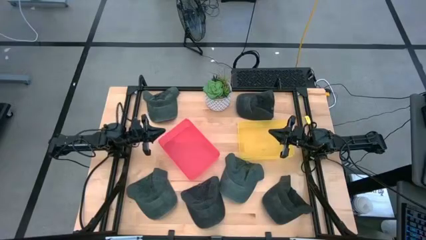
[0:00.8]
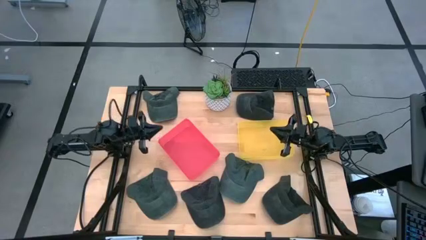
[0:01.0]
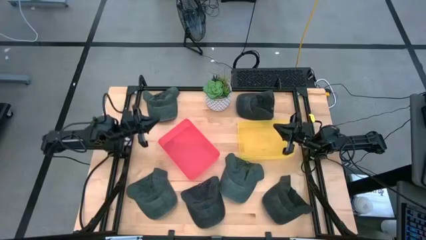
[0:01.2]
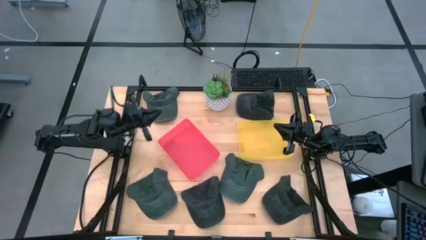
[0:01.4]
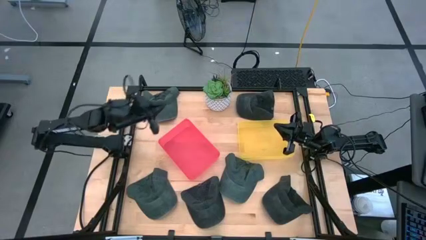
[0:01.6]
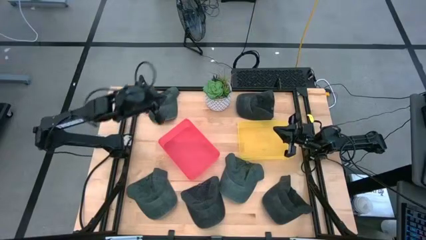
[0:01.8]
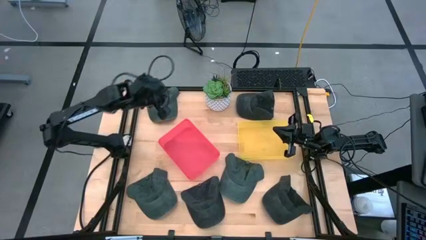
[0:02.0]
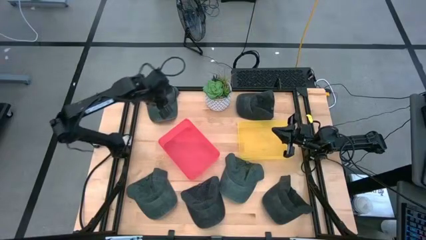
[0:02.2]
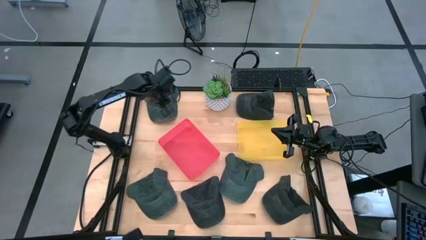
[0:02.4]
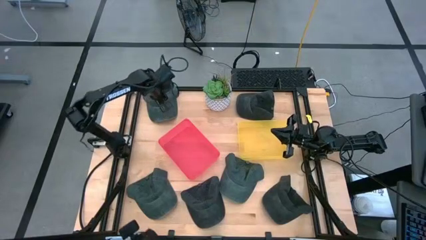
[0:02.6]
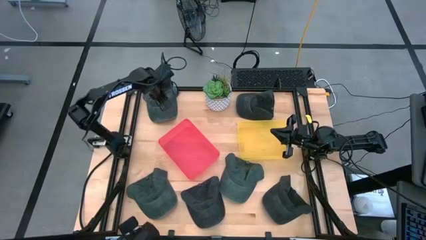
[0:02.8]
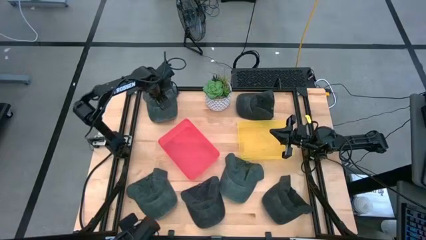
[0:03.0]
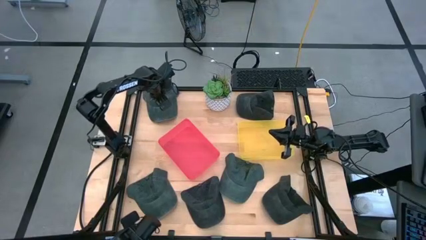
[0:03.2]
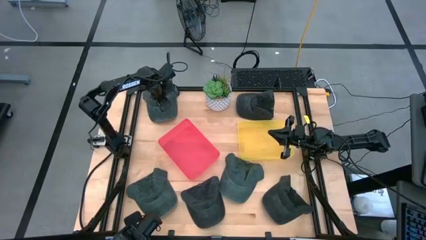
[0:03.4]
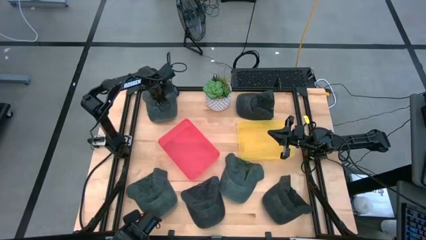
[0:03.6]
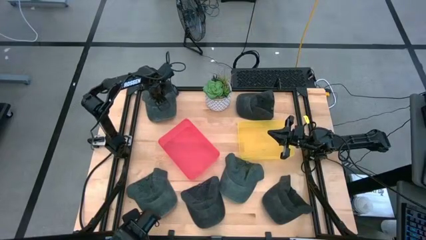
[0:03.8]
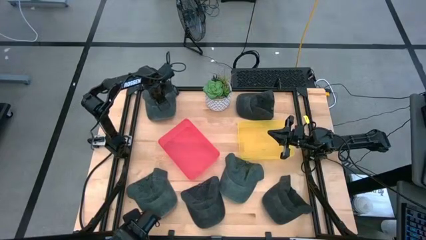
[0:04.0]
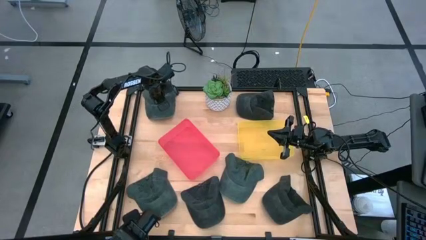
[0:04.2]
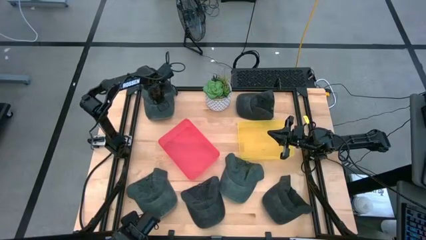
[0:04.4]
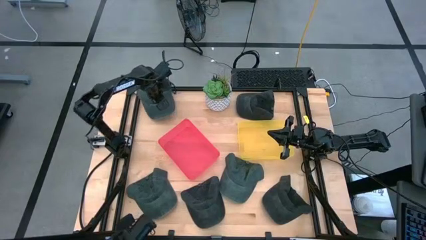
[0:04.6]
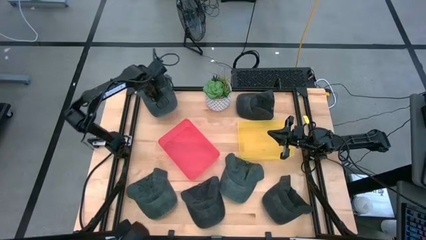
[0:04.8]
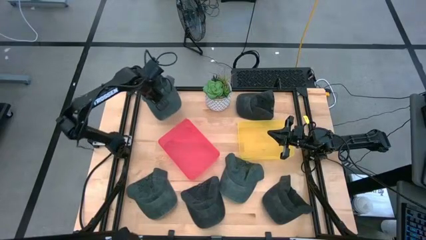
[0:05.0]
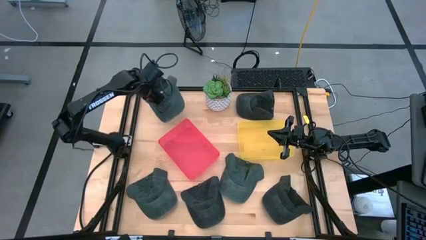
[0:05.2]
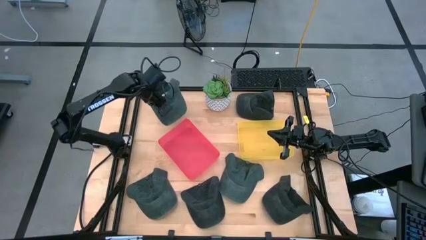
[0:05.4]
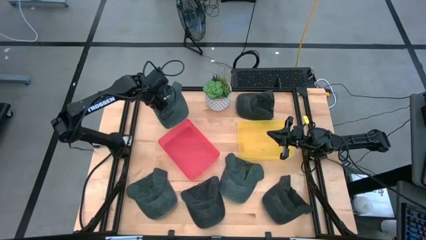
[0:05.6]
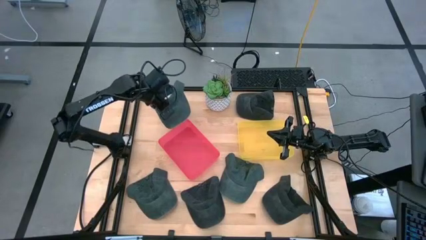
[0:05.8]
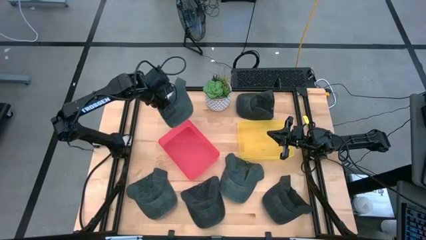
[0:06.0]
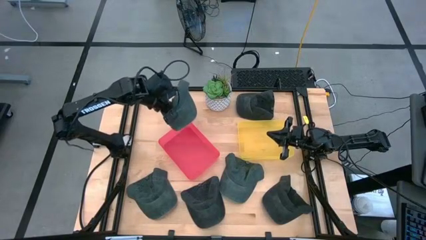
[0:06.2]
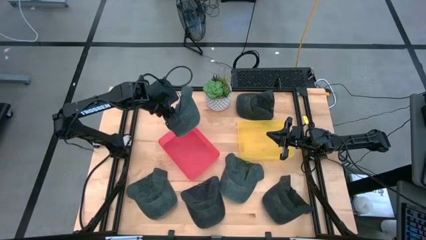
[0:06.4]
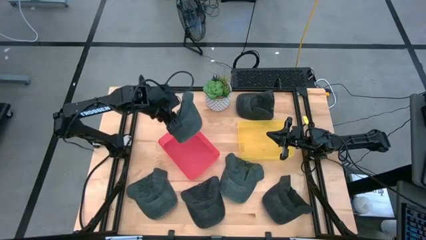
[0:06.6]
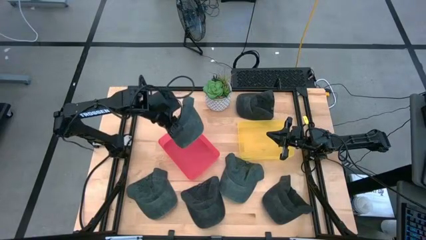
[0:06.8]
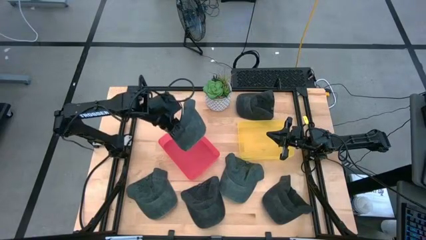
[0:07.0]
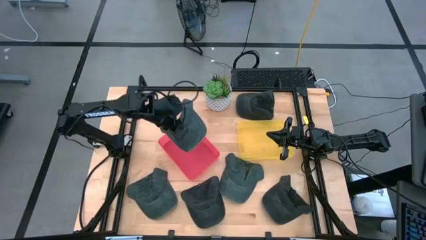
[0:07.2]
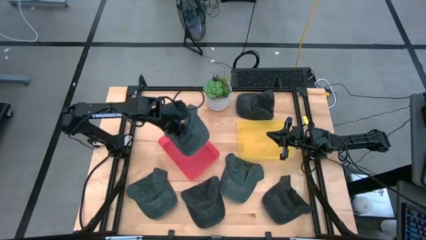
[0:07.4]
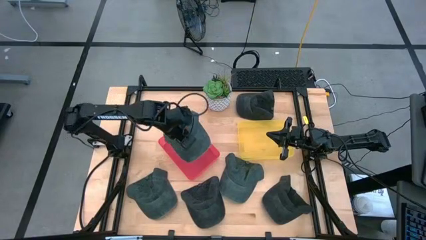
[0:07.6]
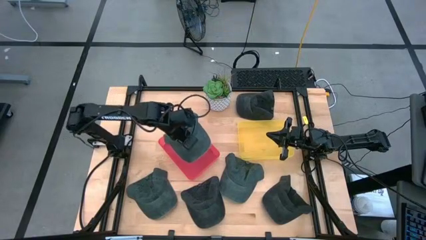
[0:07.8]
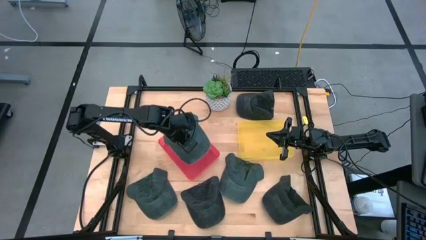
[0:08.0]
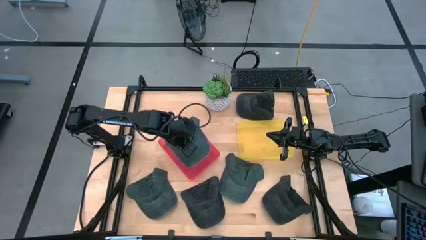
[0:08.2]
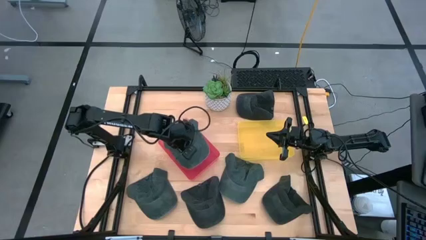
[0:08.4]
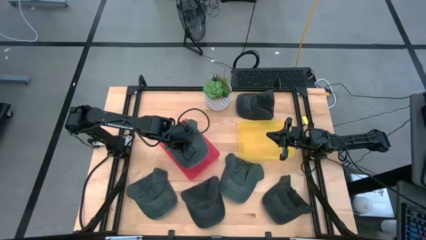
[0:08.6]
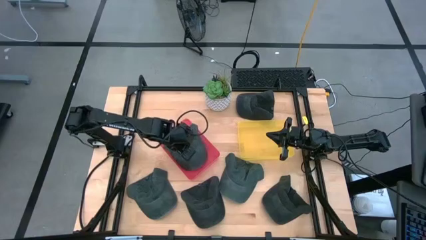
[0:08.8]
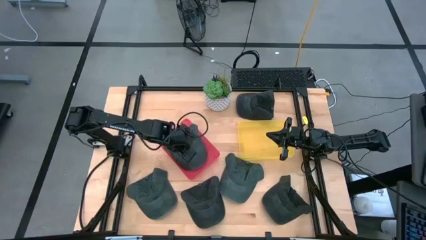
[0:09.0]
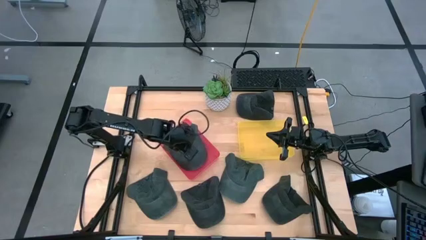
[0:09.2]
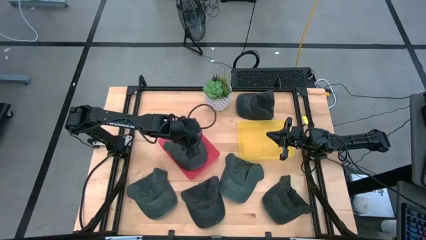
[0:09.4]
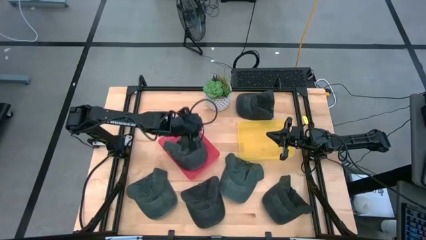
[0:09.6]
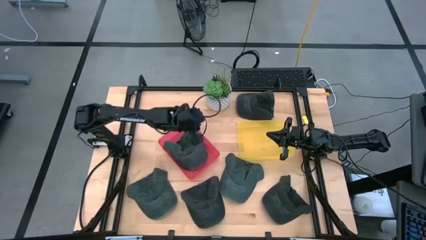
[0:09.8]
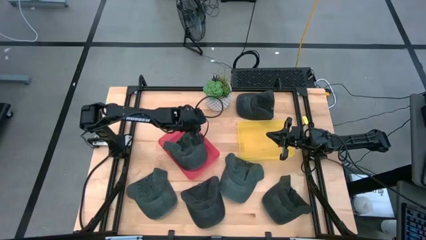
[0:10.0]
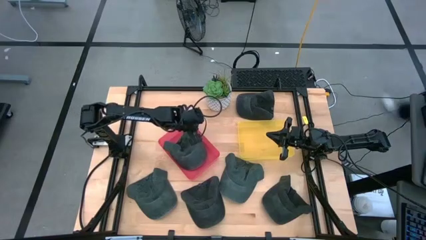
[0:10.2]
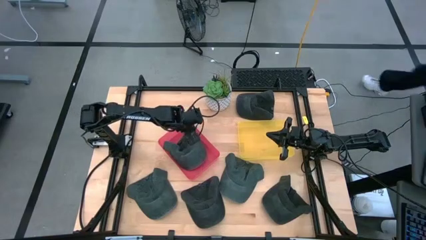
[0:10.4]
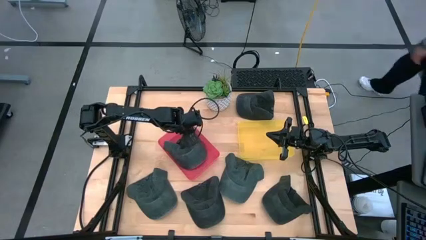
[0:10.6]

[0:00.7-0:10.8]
Task: Pick & Place hat
Put the top left dark gray cap into the red bin

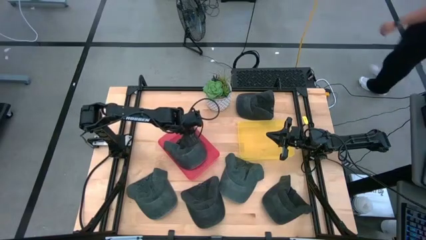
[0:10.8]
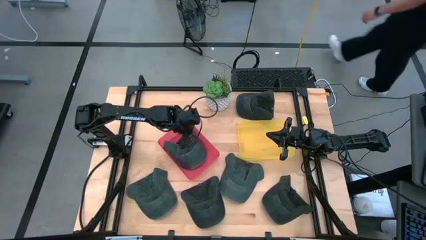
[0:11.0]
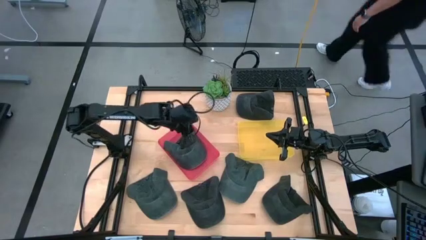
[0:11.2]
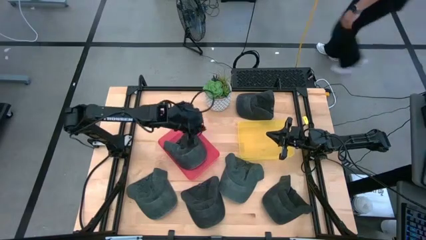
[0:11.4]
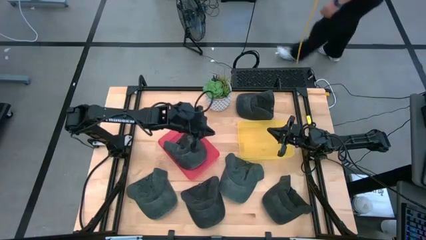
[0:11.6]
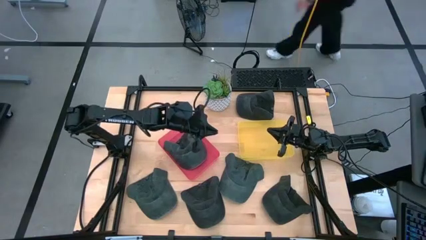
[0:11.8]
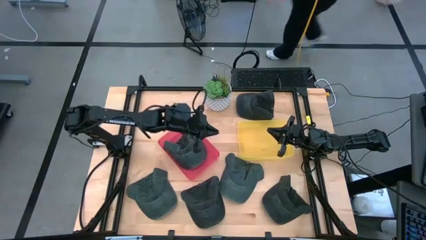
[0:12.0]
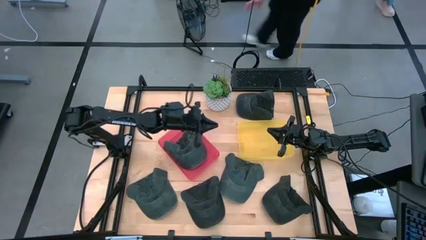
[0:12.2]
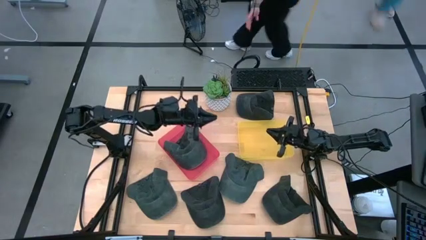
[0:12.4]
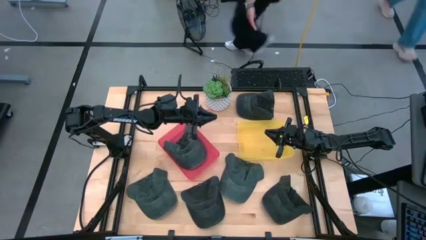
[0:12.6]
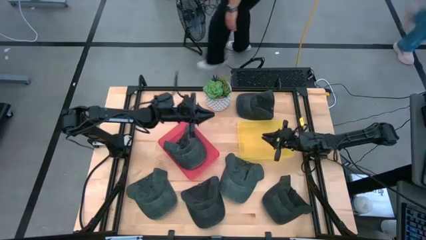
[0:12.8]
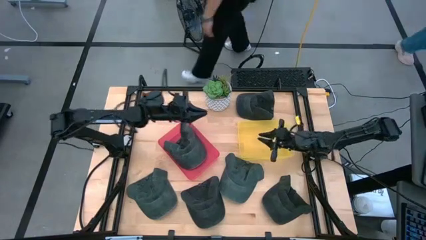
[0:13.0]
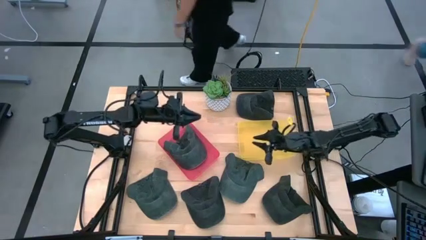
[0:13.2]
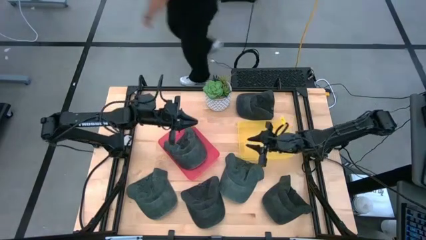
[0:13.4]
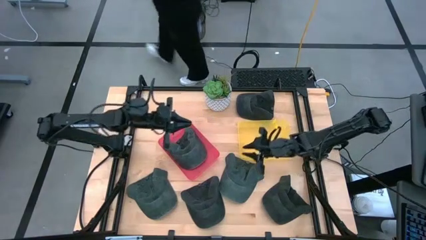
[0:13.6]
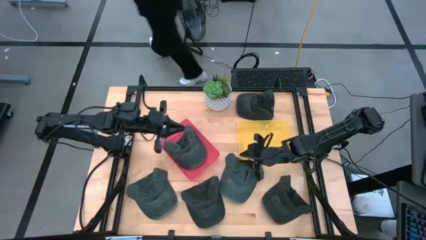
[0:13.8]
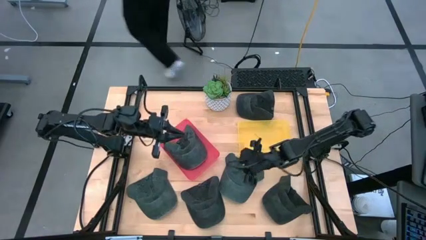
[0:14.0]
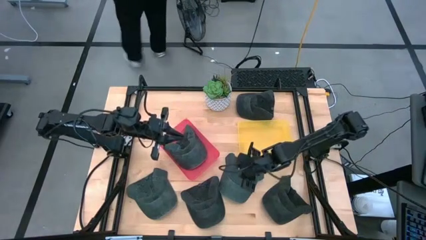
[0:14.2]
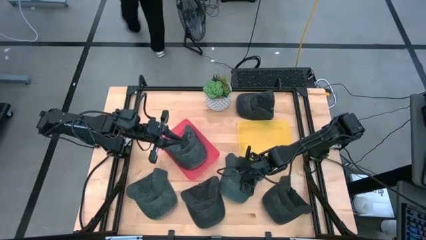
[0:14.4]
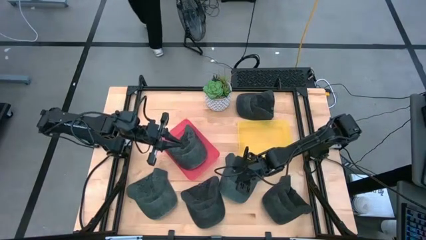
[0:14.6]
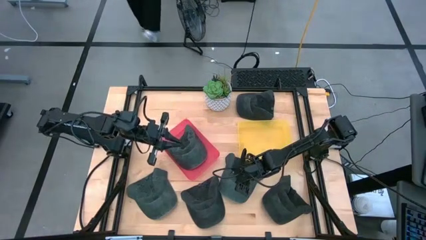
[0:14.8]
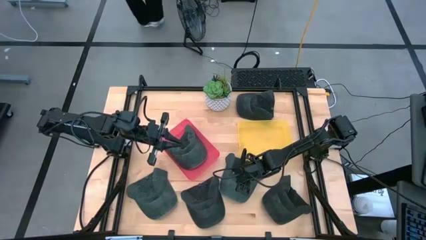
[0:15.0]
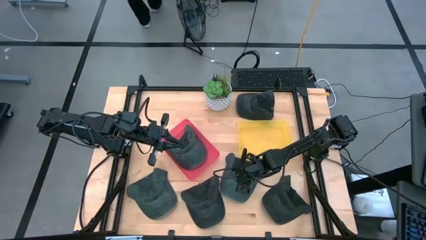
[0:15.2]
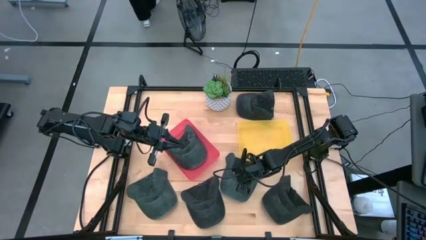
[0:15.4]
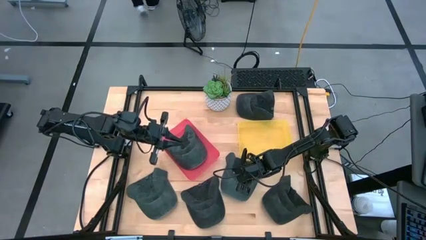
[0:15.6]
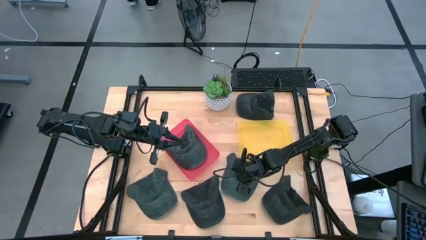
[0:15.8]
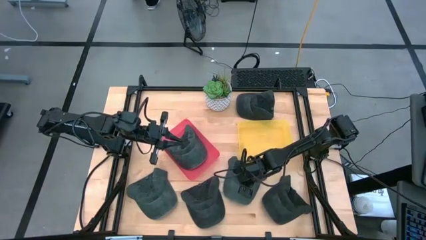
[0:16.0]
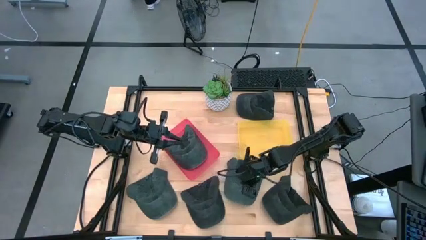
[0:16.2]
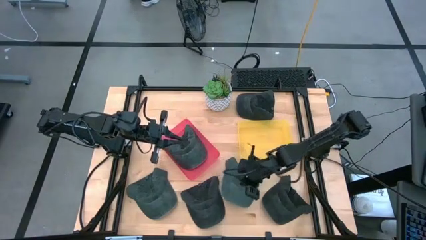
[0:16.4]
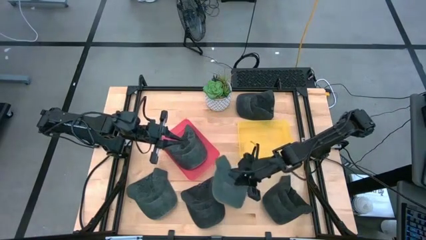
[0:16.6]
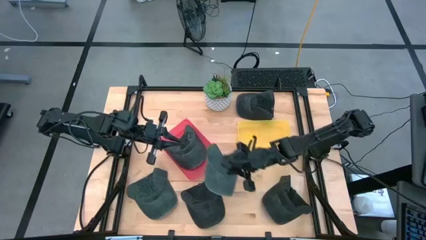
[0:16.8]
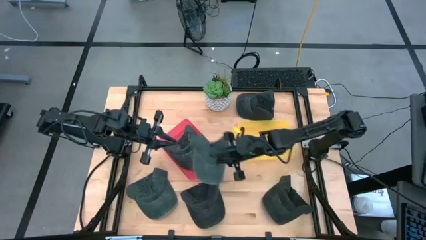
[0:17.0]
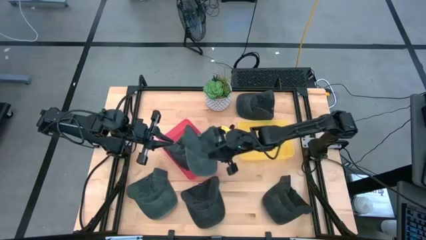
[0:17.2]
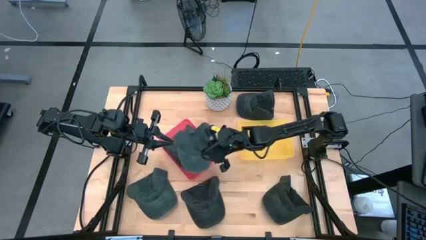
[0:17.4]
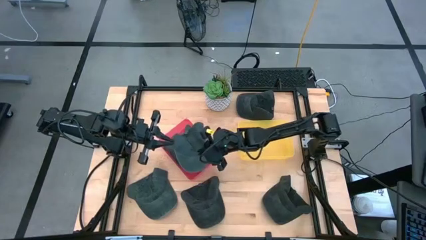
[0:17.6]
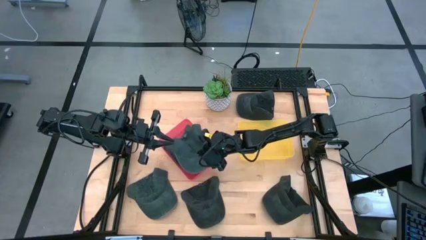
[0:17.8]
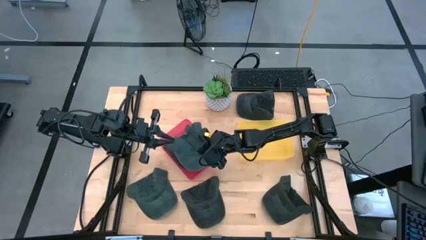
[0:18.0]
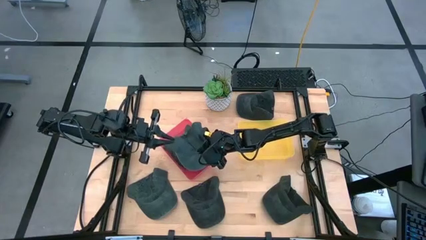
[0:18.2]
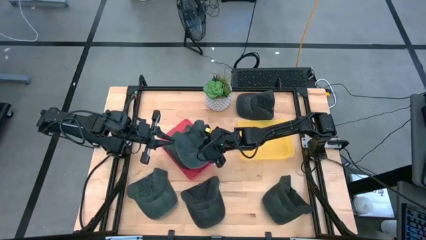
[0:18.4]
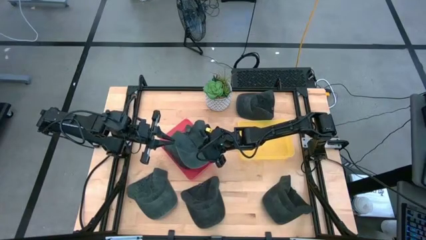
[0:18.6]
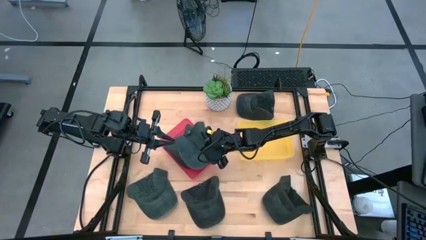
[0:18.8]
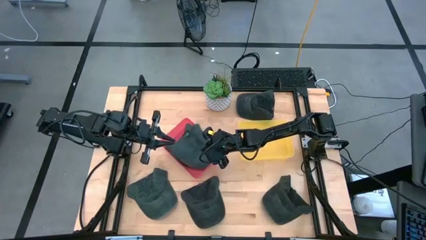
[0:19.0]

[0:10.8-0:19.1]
Put the right dark gray cap into the red bin
